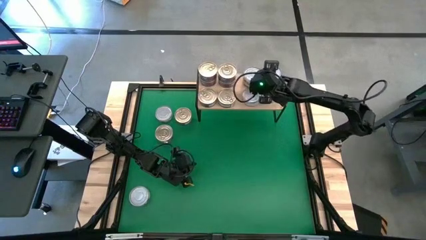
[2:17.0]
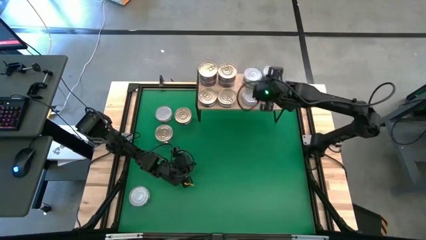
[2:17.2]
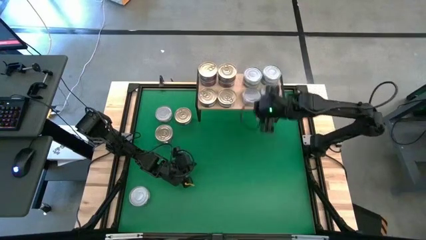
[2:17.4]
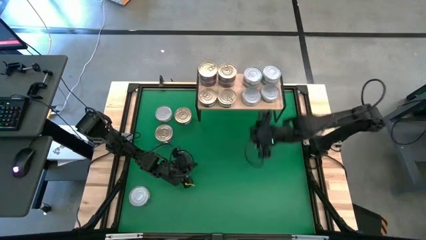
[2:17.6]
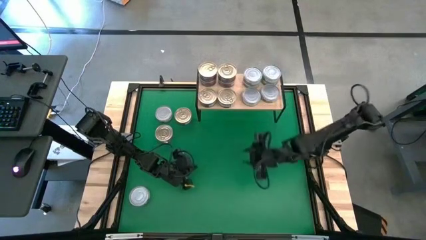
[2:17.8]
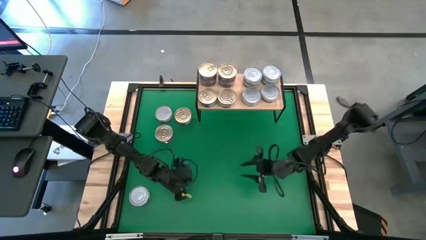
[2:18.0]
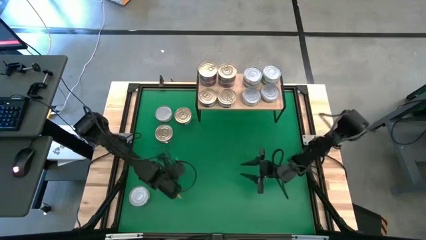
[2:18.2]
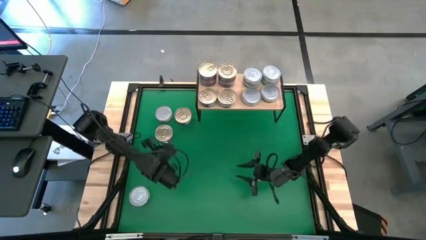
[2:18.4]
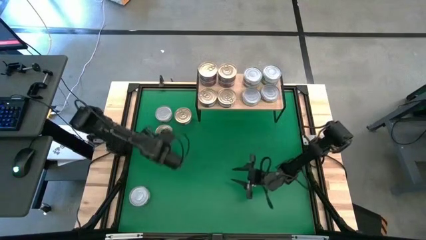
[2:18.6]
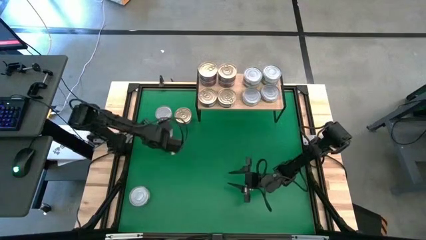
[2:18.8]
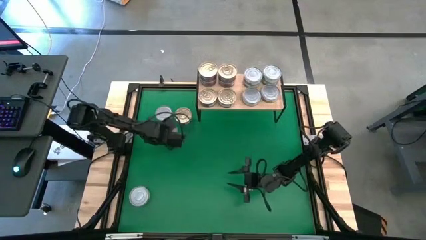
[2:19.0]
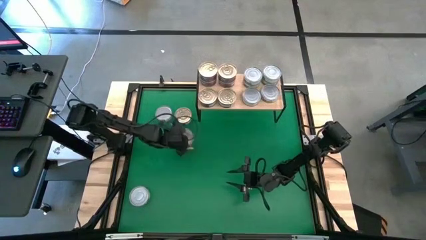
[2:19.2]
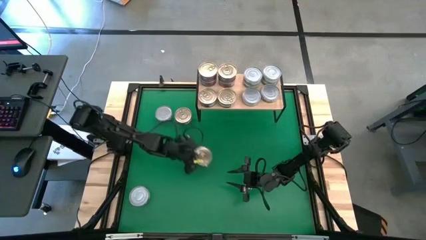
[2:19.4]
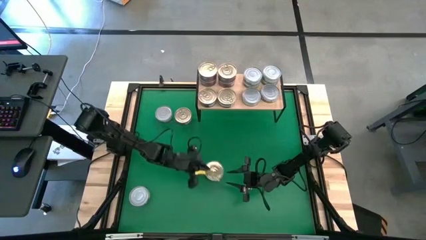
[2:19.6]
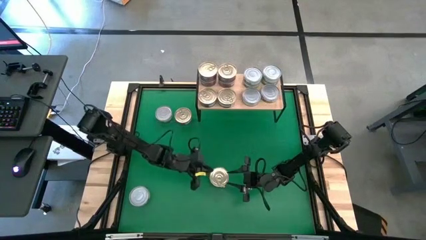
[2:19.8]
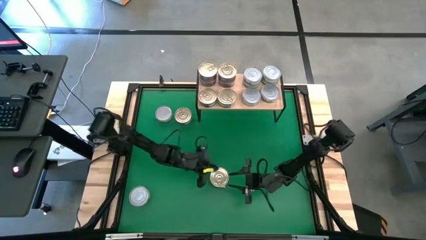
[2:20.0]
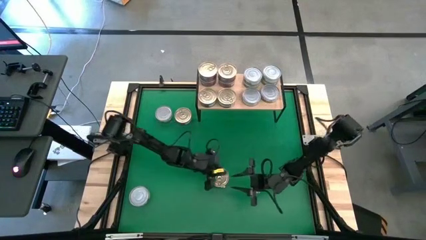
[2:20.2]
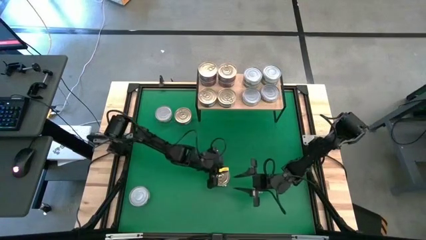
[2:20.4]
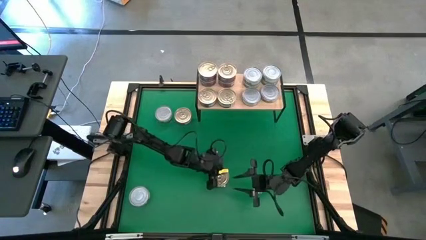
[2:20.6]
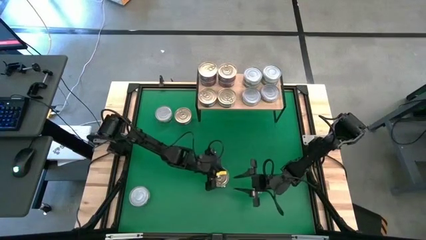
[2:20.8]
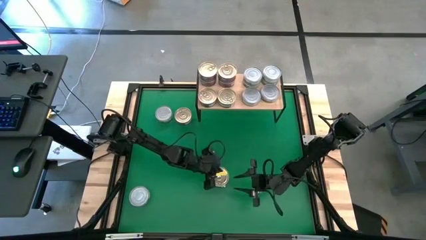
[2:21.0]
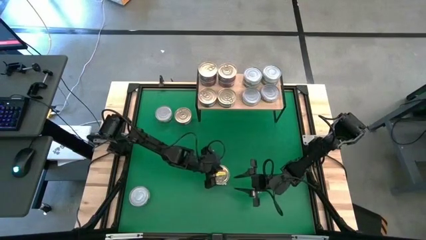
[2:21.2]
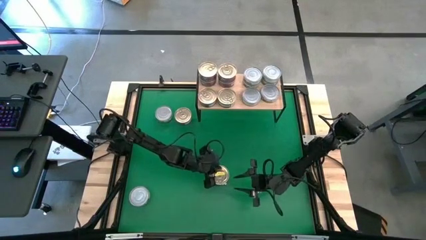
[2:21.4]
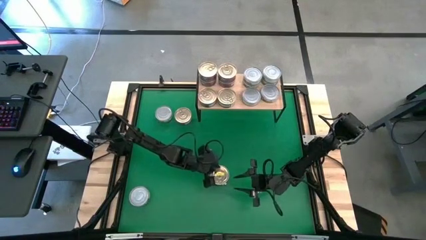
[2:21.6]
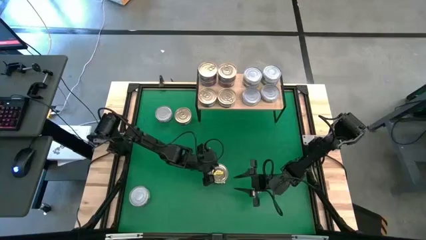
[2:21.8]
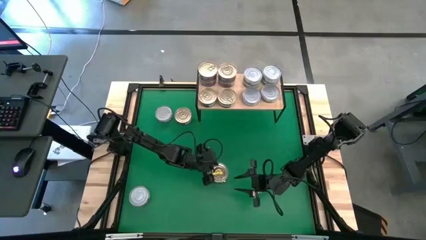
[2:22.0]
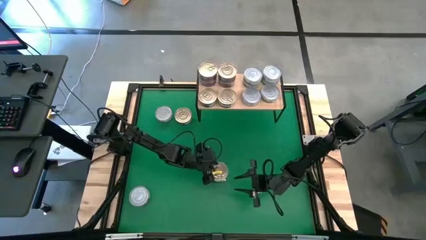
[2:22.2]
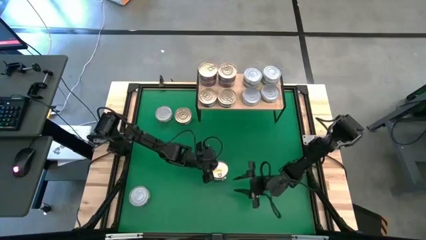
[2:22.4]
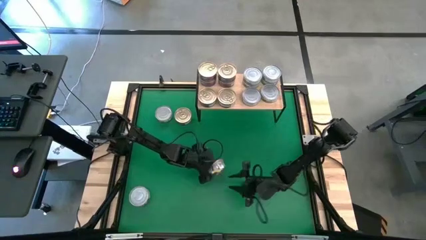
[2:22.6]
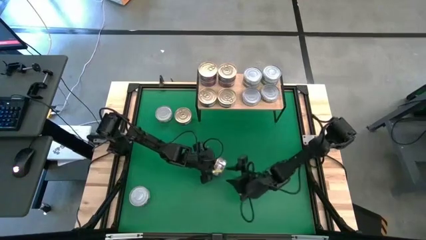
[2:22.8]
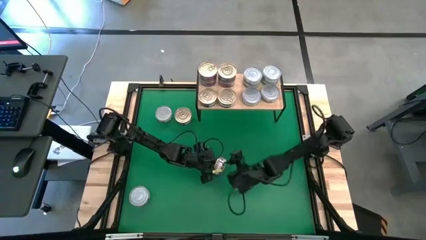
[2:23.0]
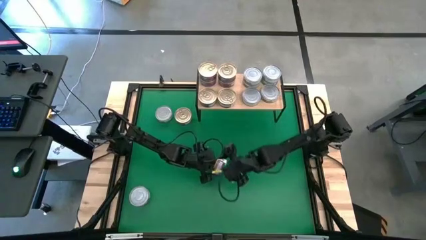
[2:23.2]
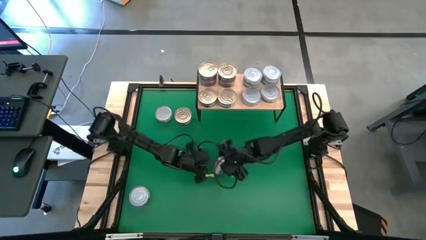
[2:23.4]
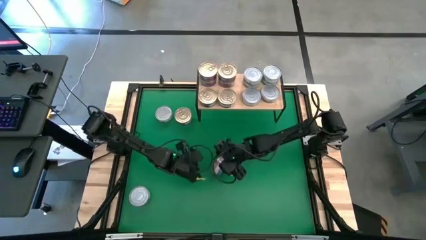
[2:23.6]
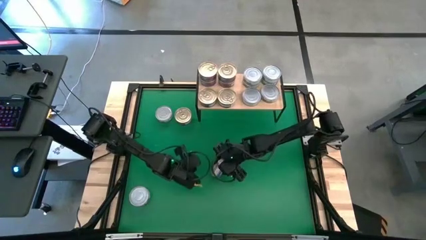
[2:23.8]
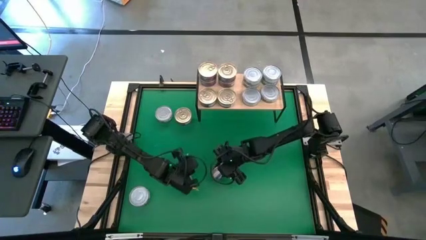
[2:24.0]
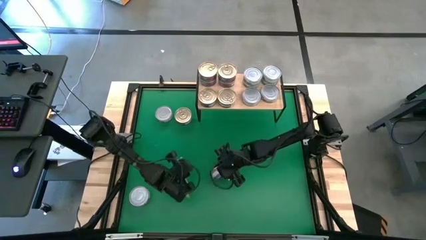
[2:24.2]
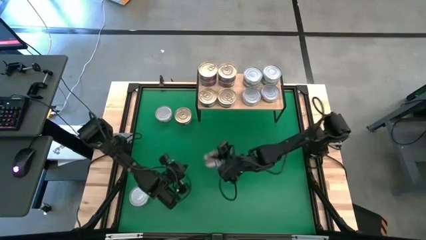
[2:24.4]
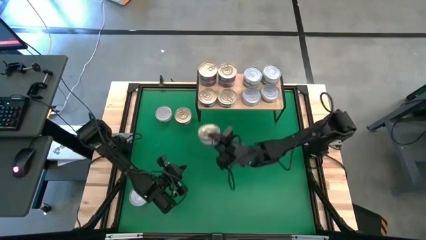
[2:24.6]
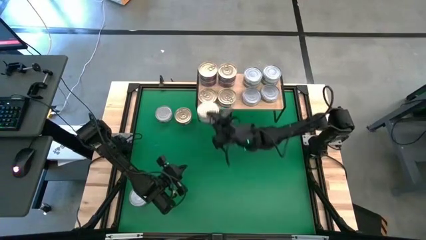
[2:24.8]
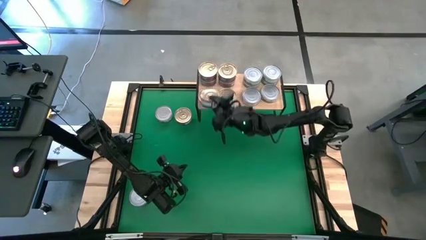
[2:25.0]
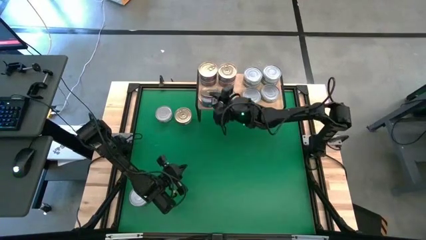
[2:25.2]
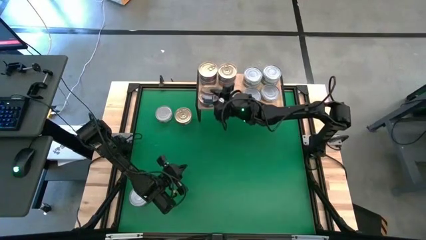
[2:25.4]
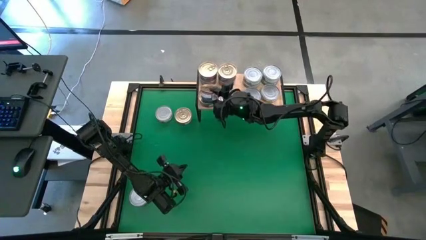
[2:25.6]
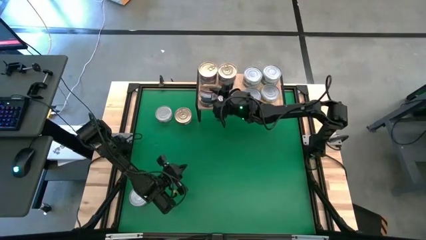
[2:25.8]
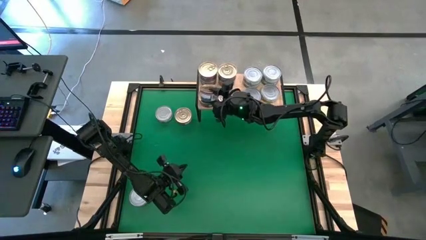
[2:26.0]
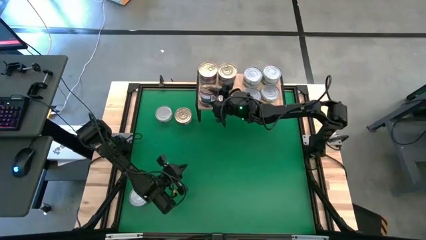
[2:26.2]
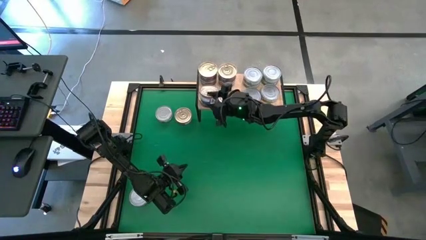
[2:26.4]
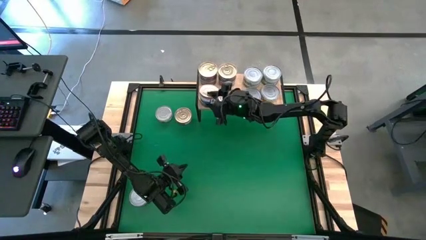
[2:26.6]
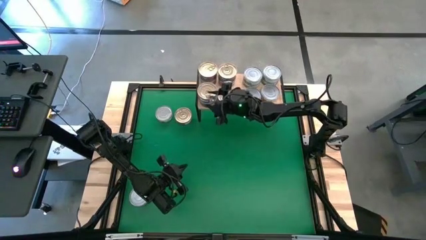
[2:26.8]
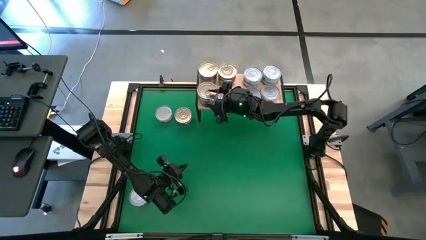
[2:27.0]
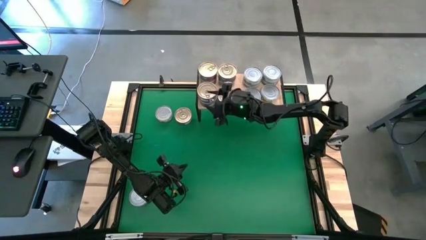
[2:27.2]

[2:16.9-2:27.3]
Task: Stack canned seafood by type on shelf
Stack the blue pink tuna can on top of the bottom left blue pink tuna can on the shelf

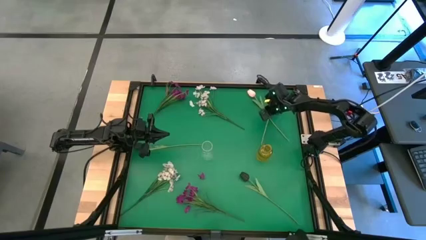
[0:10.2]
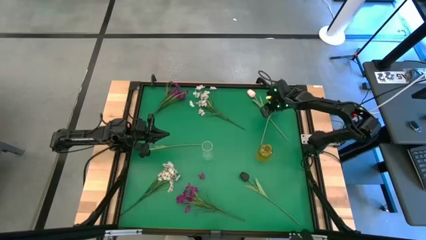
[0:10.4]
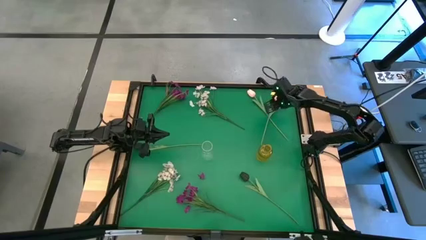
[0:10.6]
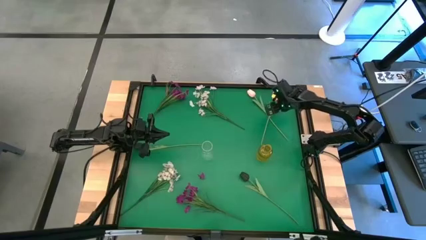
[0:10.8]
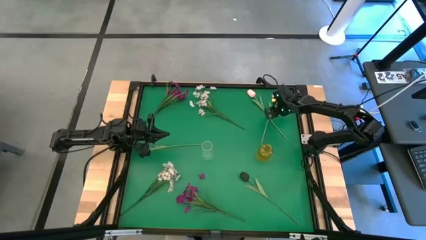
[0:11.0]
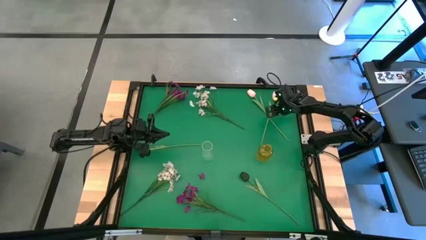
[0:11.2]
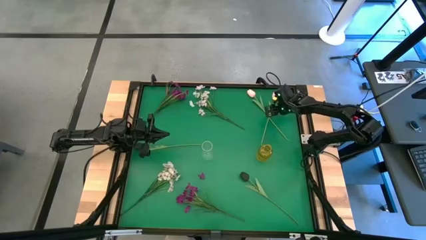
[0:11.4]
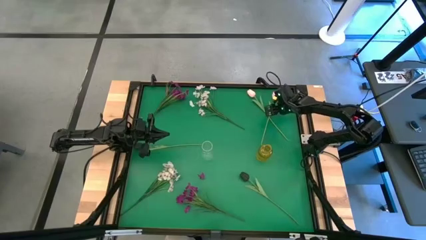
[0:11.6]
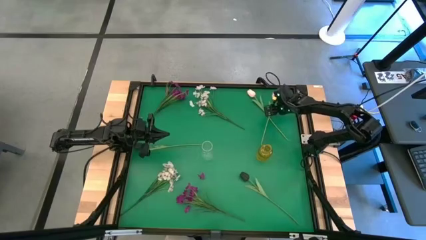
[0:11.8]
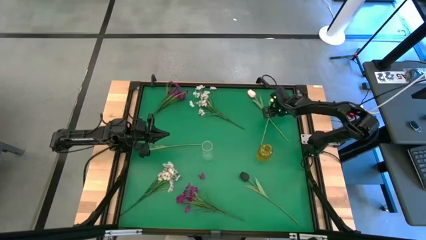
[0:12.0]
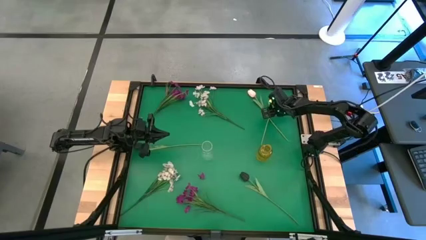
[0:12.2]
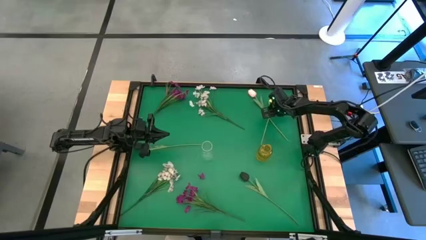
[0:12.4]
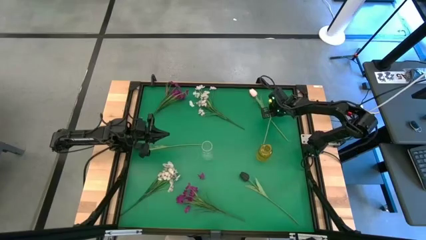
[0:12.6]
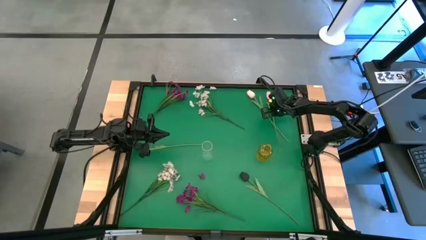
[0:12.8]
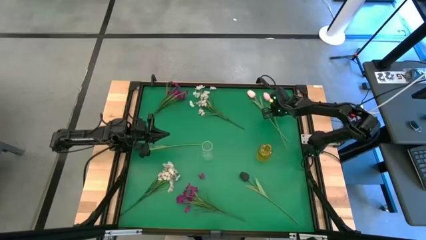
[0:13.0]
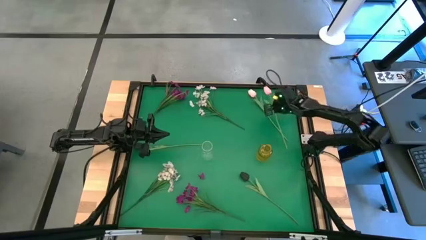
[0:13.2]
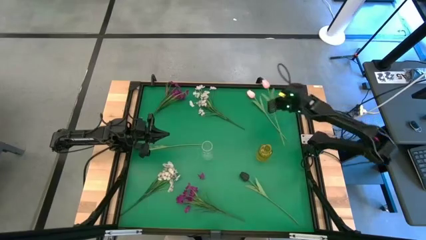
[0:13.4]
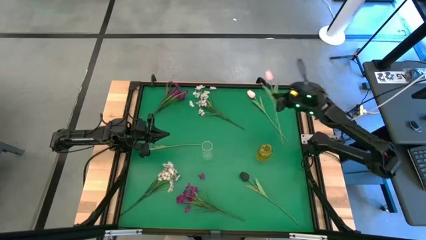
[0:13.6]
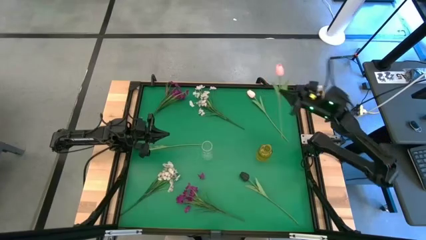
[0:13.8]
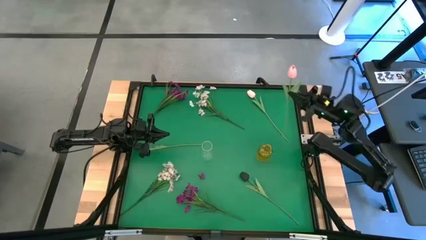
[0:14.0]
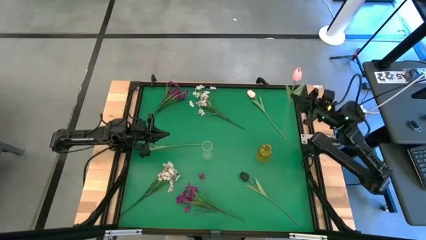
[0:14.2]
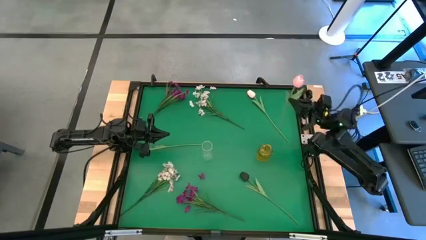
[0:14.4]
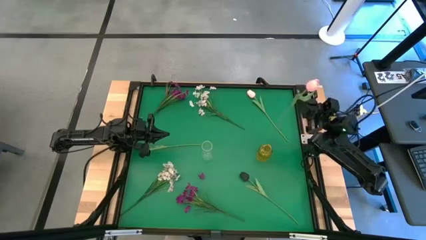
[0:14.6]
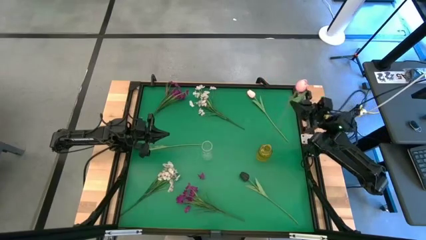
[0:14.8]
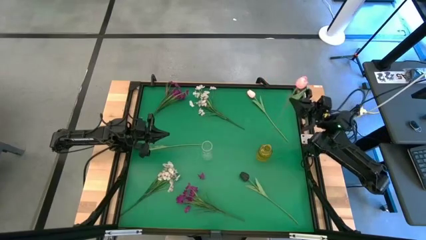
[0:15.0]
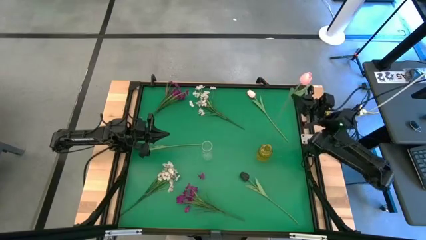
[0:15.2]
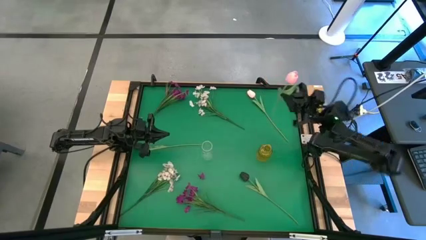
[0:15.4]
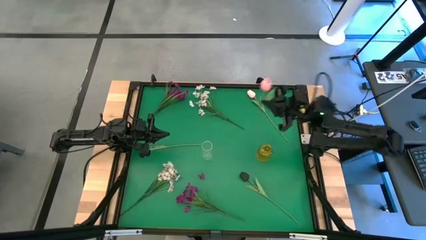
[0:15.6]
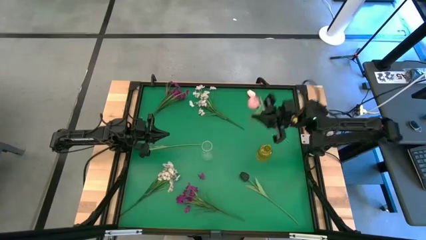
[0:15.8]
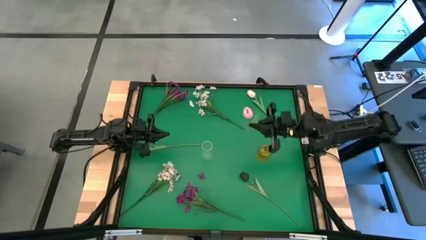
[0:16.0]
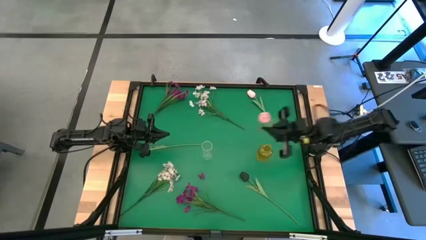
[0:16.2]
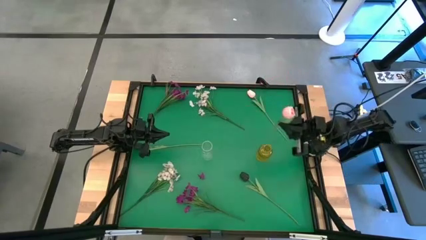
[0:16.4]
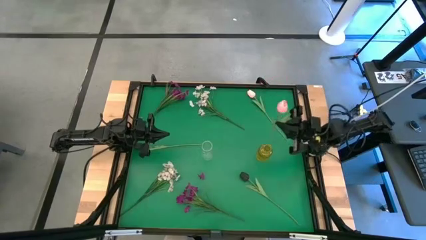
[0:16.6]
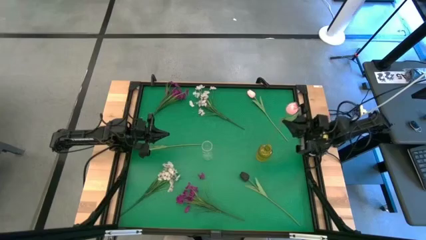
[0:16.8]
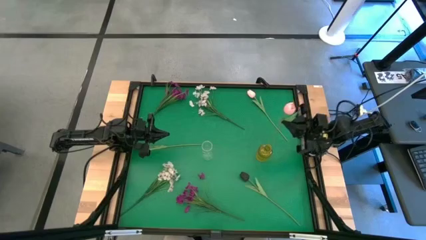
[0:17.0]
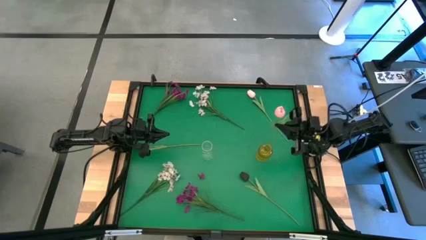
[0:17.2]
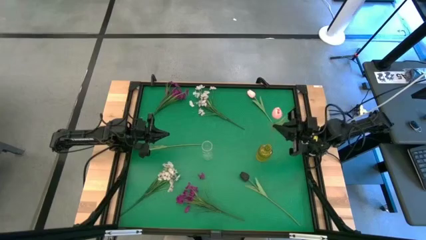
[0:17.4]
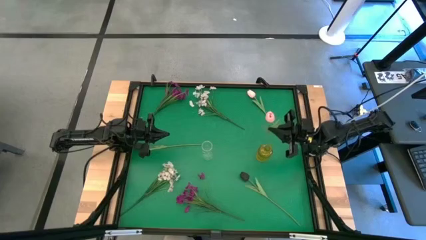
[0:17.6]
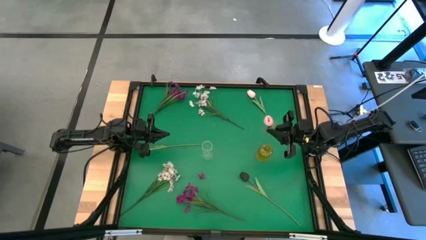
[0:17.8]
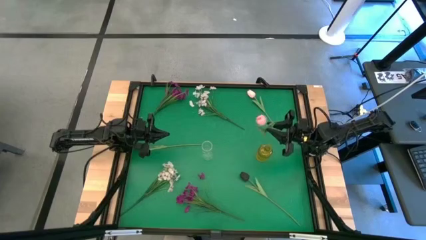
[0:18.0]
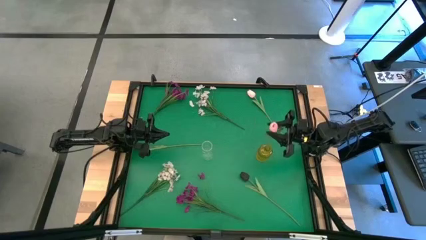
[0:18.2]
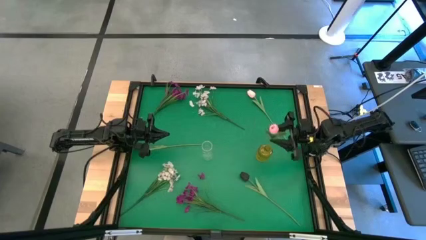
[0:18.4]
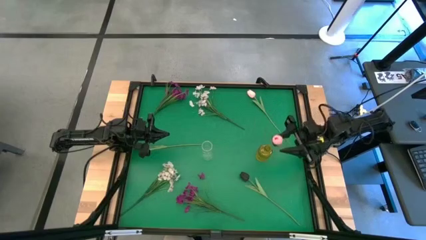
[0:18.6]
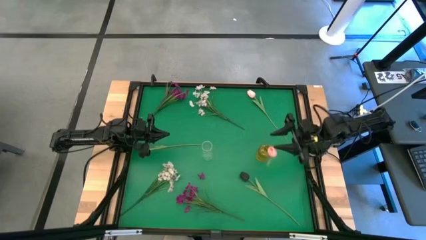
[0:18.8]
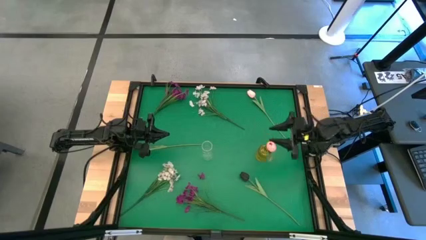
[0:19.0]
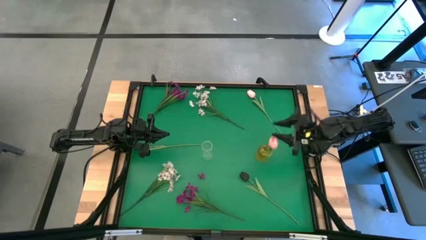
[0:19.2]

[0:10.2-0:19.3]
Task: Sort flowers into vase by color
Put the right pink tulip into the yellow vase
